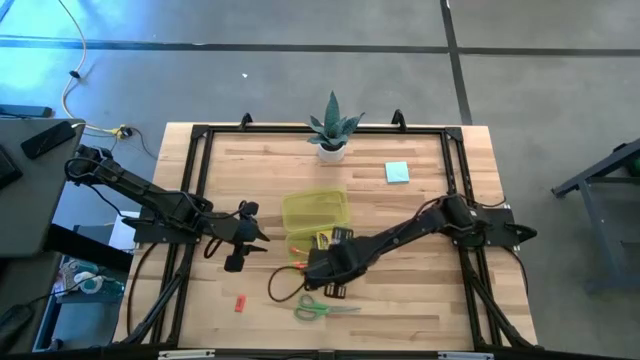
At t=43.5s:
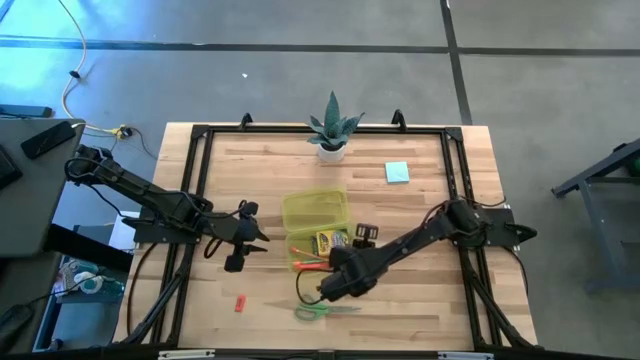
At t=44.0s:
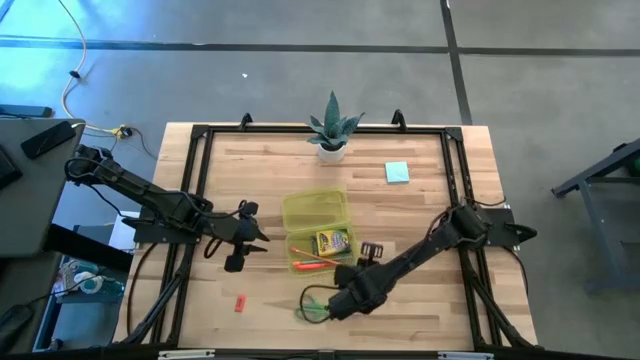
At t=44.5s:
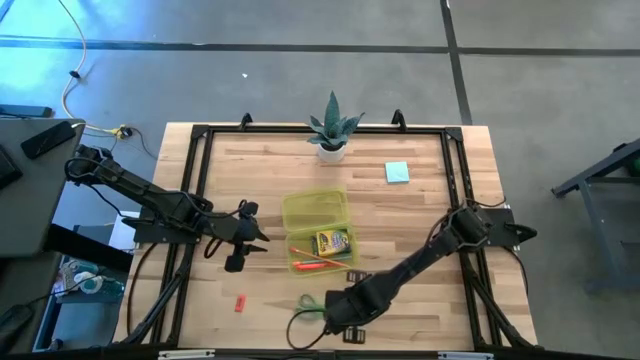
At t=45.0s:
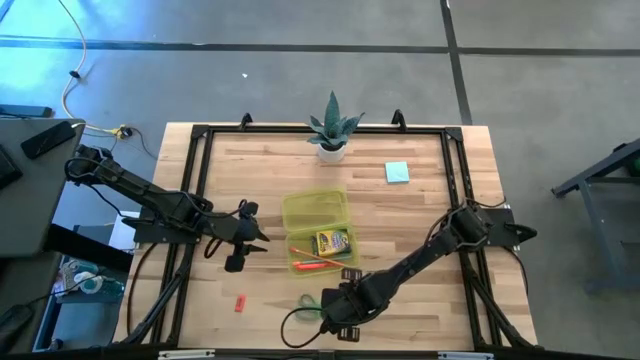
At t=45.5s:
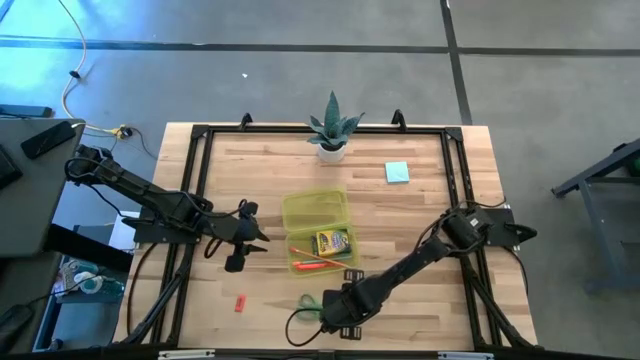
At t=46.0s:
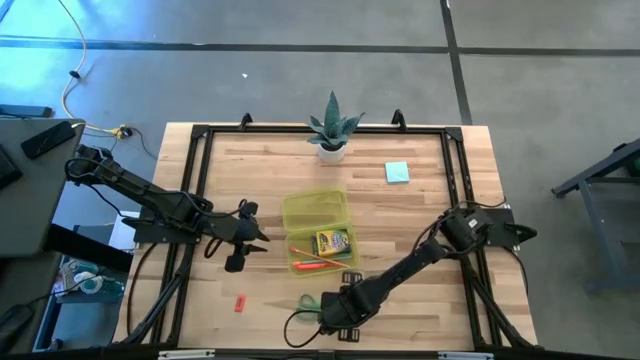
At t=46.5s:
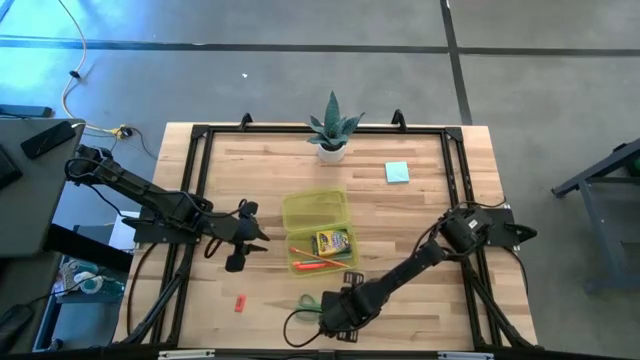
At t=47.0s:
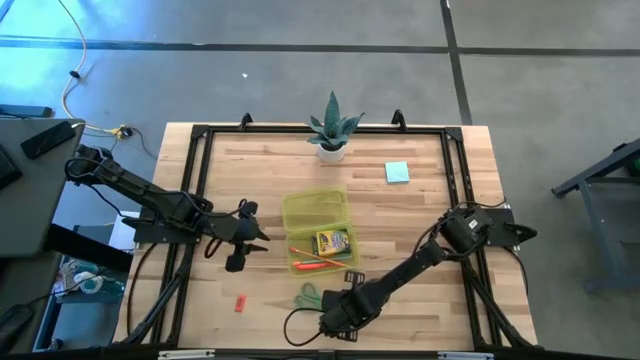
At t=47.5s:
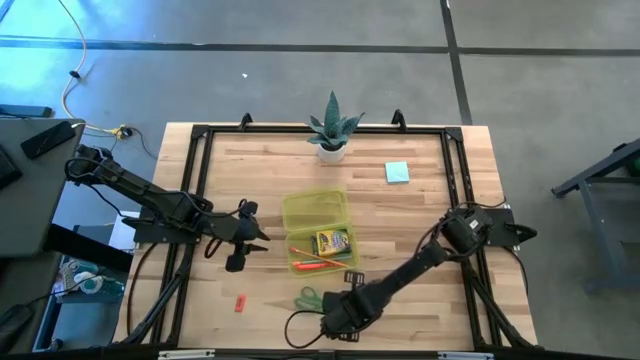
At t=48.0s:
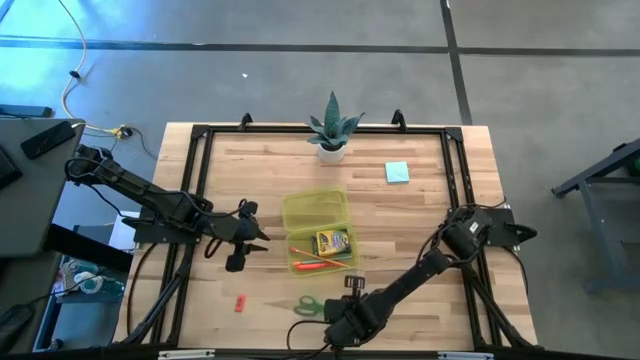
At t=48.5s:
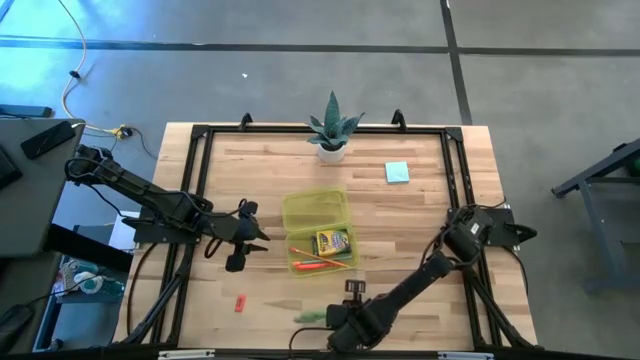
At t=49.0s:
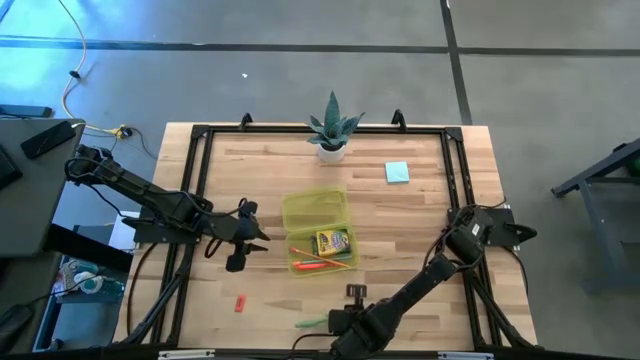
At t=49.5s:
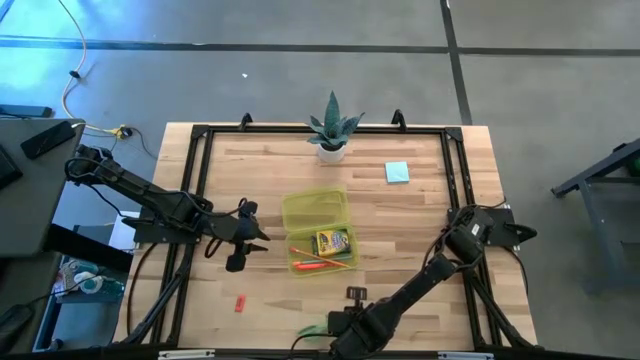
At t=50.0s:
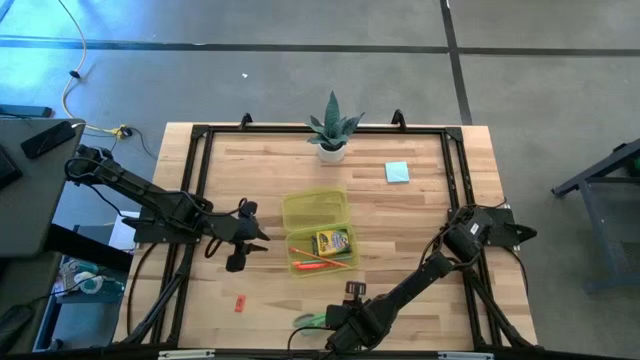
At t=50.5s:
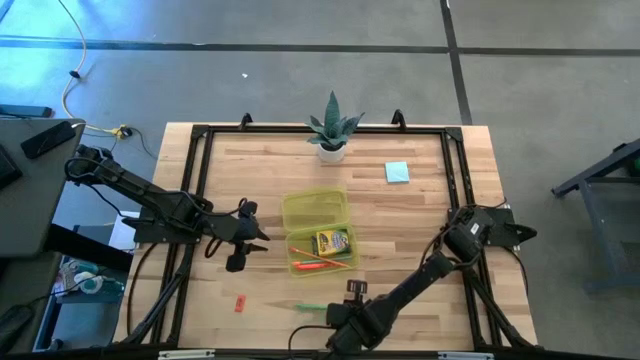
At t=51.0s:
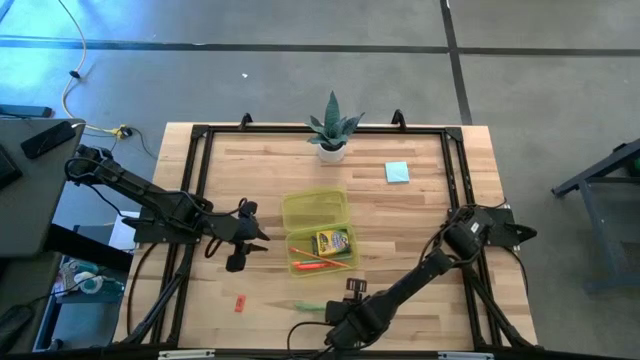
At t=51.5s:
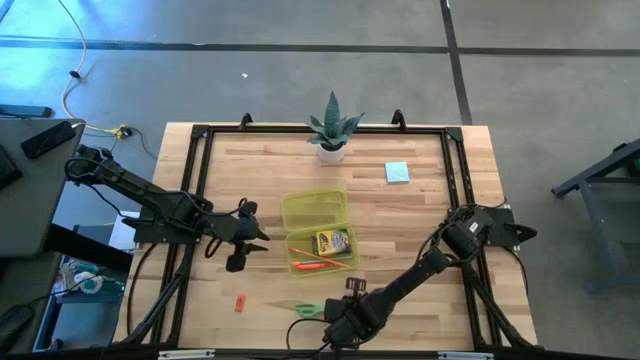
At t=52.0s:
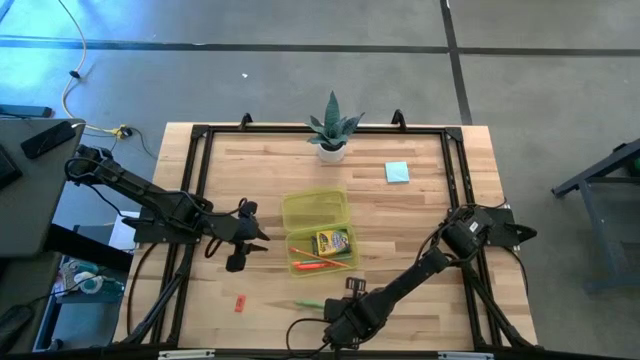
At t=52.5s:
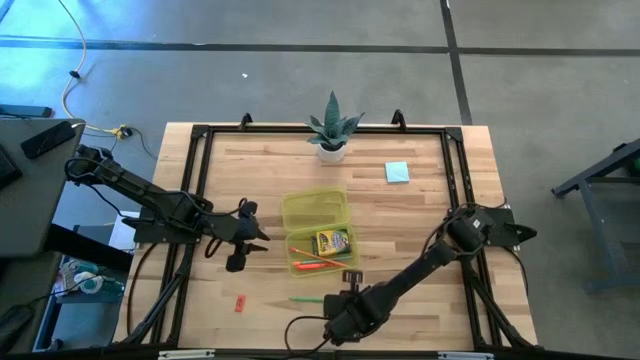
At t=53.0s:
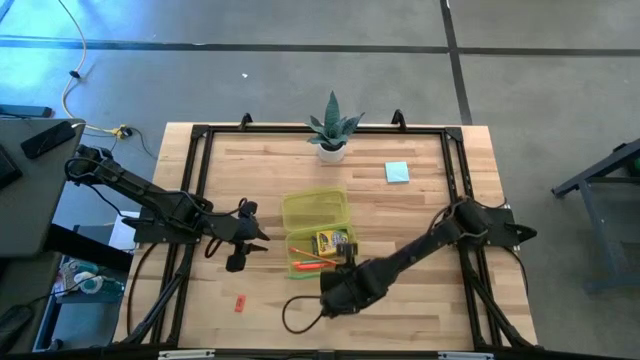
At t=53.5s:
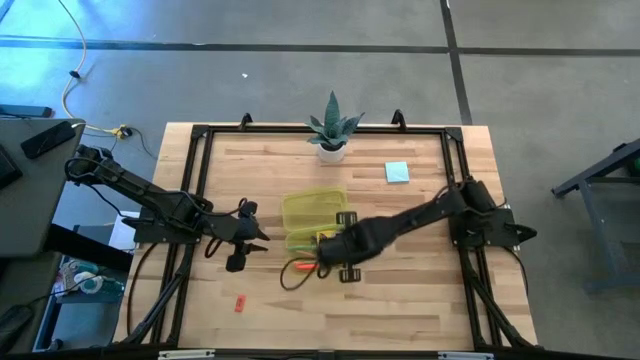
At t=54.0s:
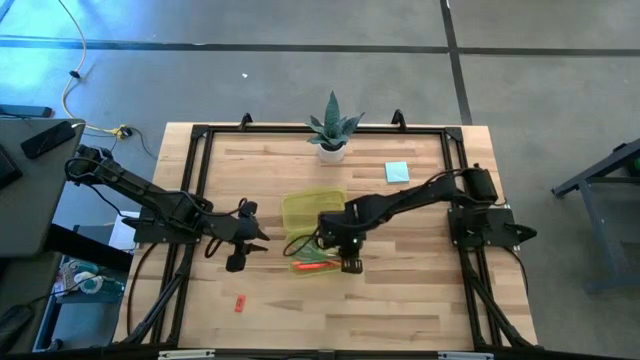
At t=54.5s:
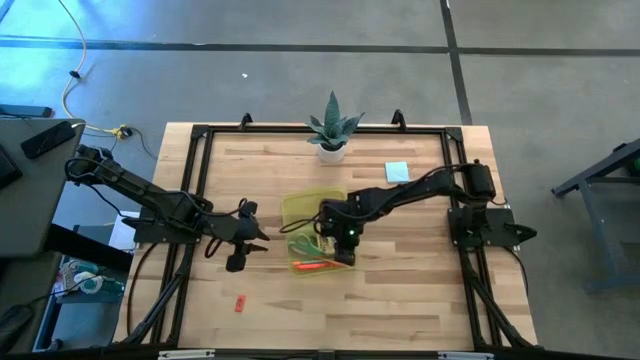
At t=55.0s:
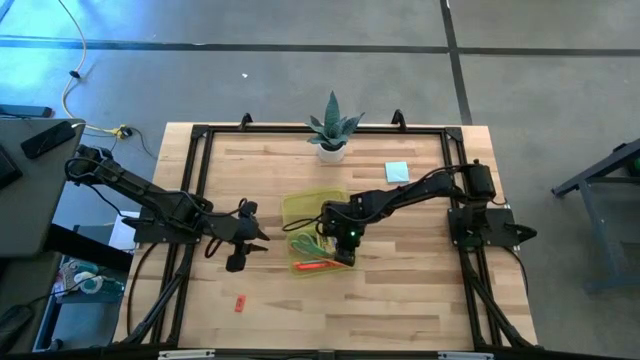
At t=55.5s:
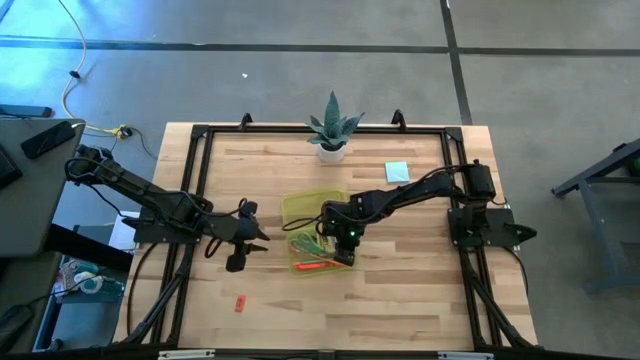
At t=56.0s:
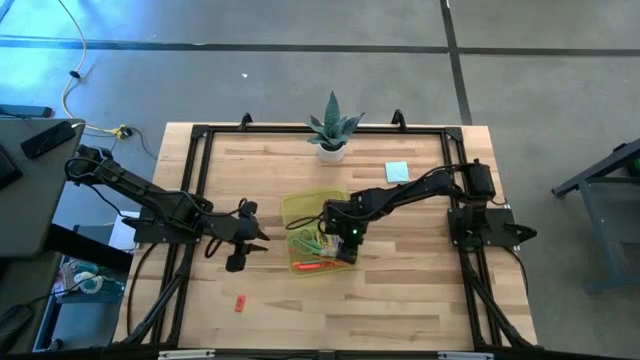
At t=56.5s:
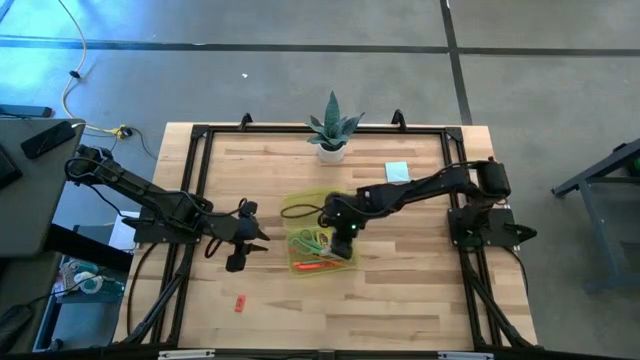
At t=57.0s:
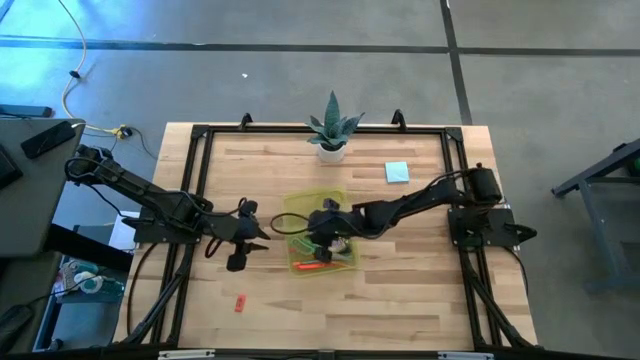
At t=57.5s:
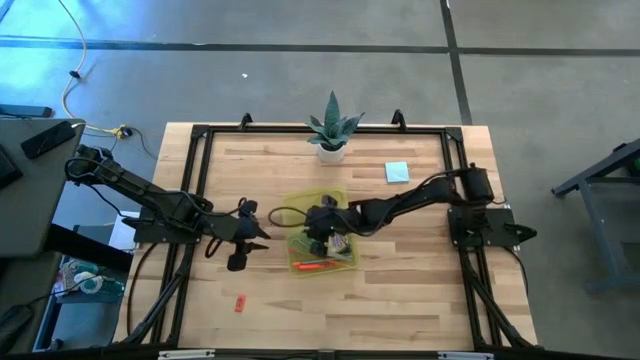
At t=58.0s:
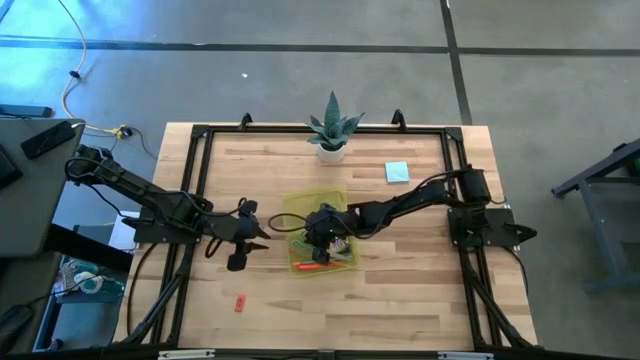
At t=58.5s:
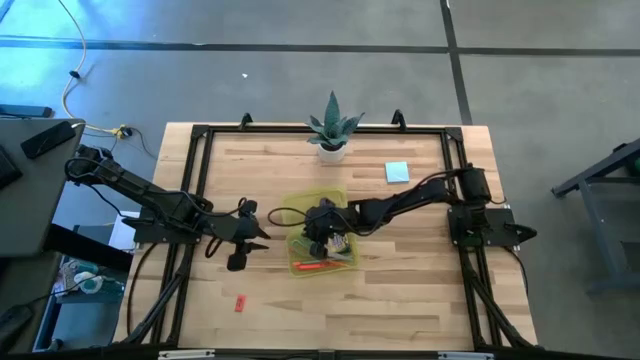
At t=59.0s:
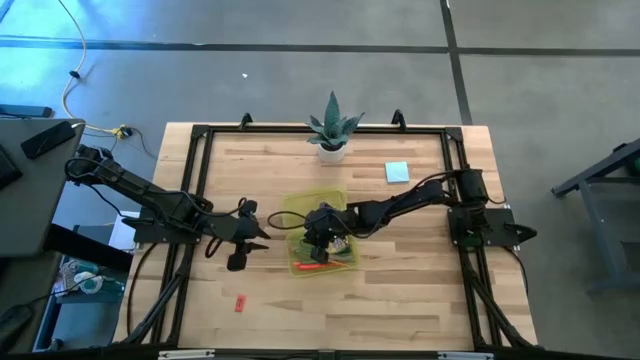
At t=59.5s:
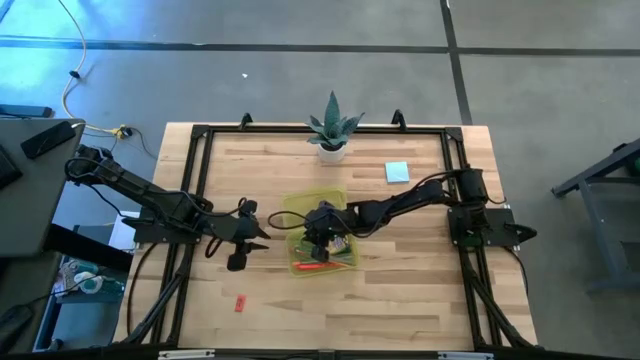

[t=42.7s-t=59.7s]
Task: Pack school essentials
Put the green scissors into the yellow school supply box

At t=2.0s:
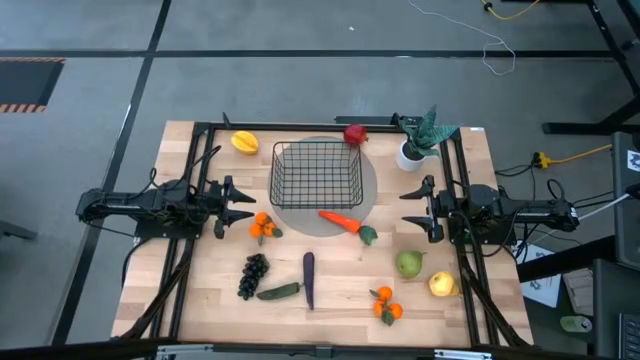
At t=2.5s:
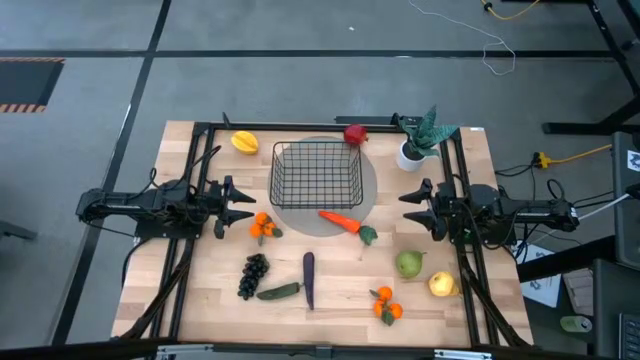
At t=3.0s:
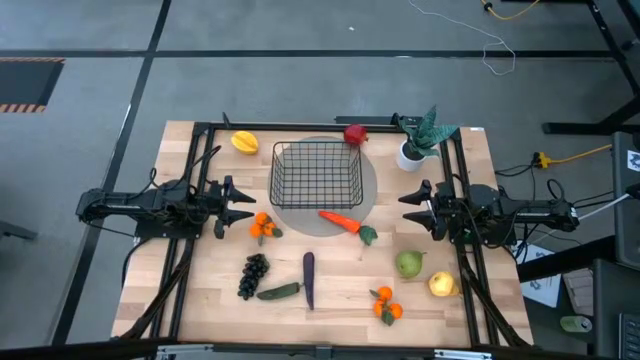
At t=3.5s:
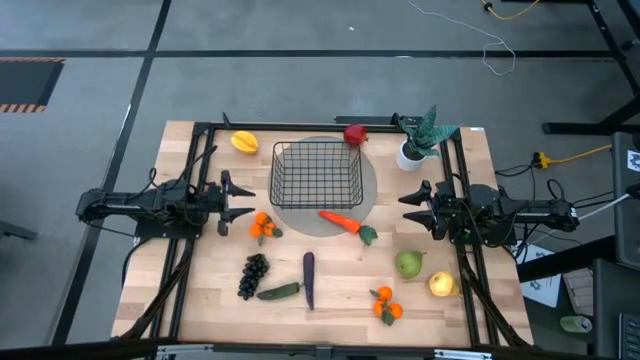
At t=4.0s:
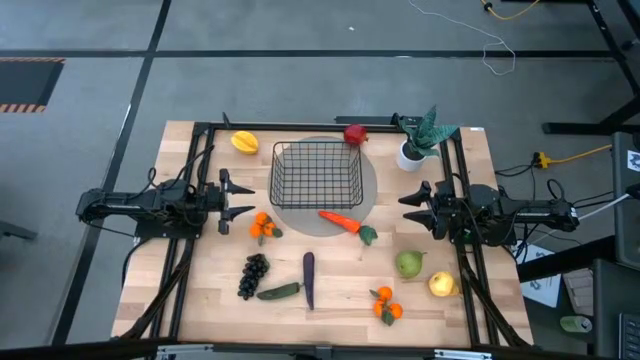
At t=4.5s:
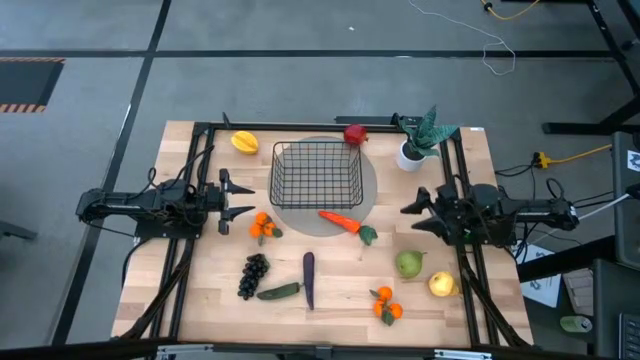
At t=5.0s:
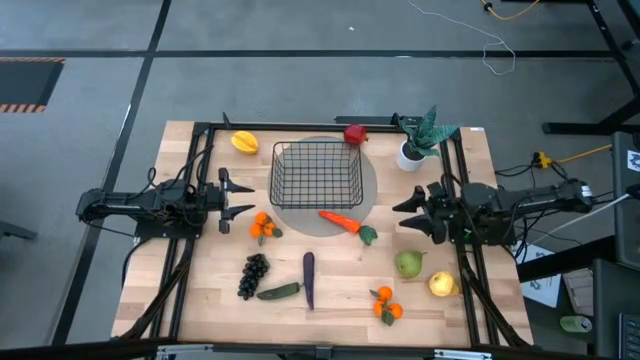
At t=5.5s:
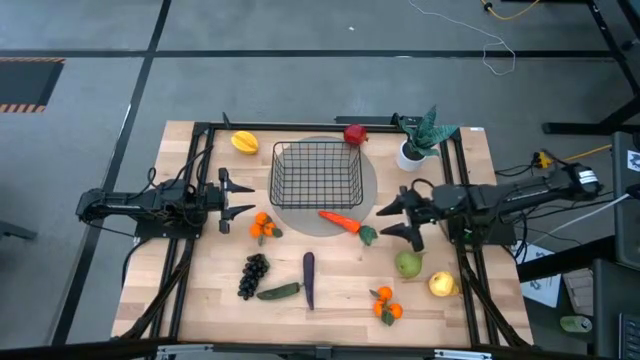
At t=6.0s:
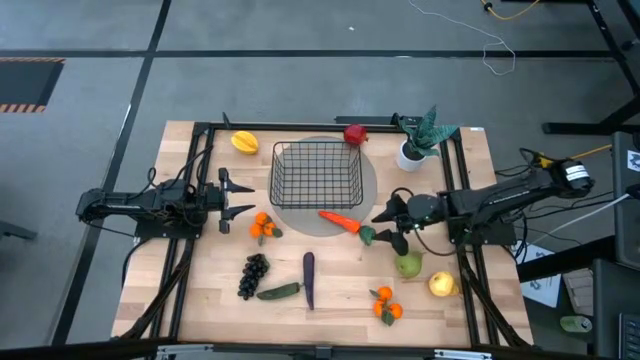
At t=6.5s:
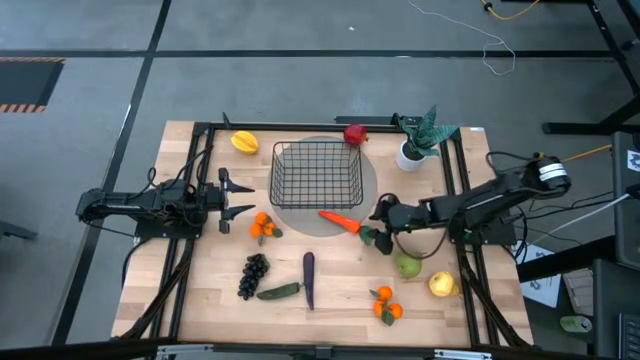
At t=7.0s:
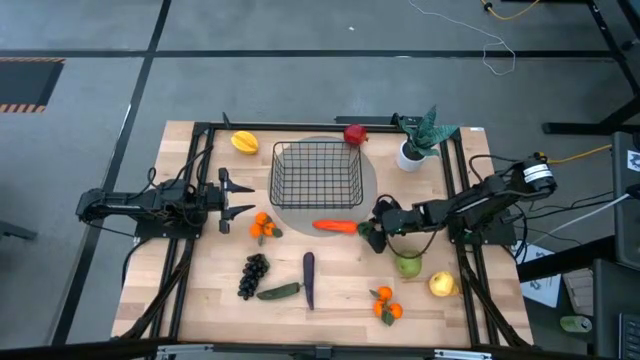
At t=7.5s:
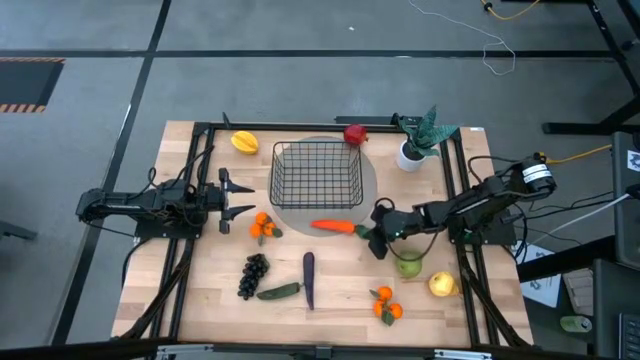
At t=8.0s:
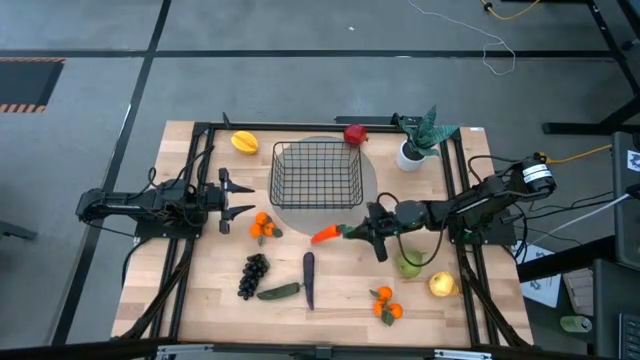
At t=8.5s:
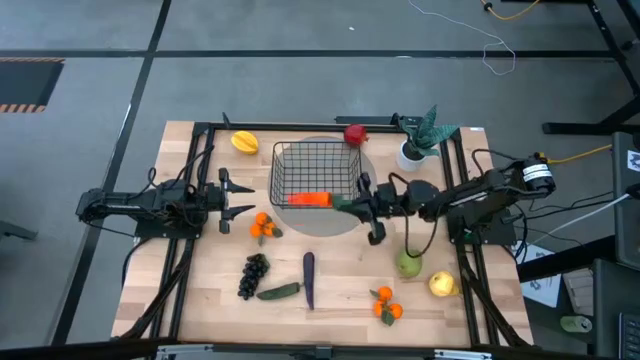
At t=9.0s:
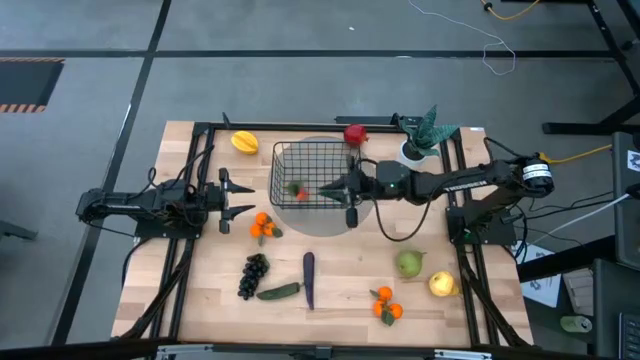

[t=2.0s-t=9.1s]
Task: Build produce basket
Put the orange carrot into the wire basket
